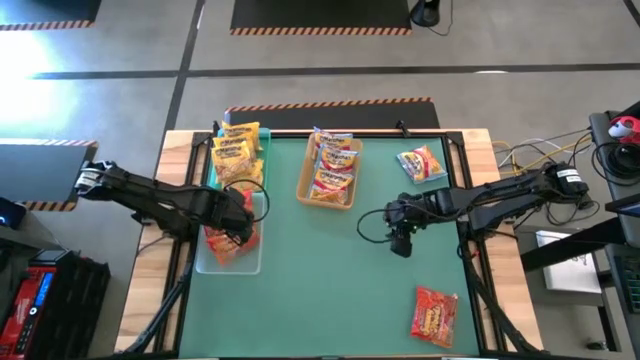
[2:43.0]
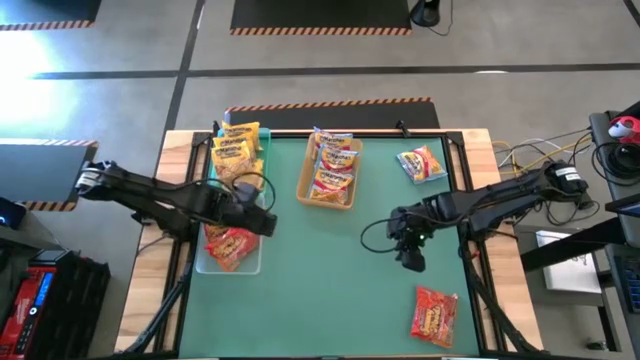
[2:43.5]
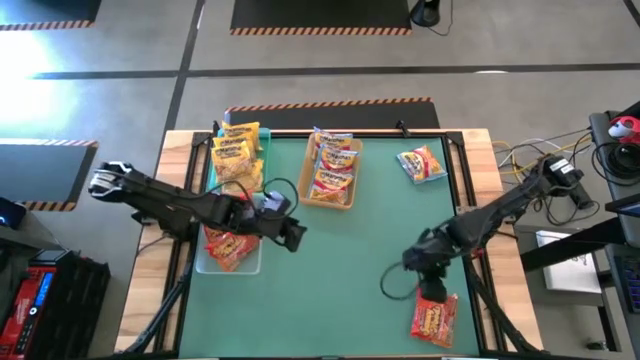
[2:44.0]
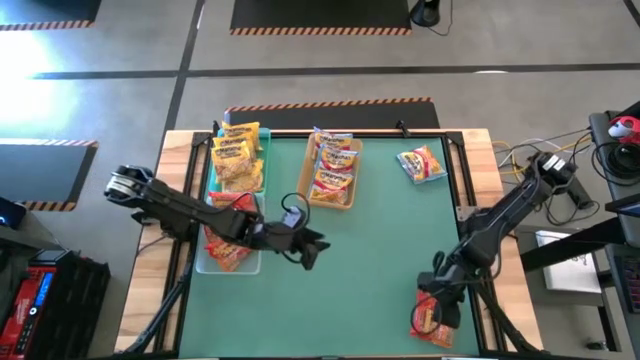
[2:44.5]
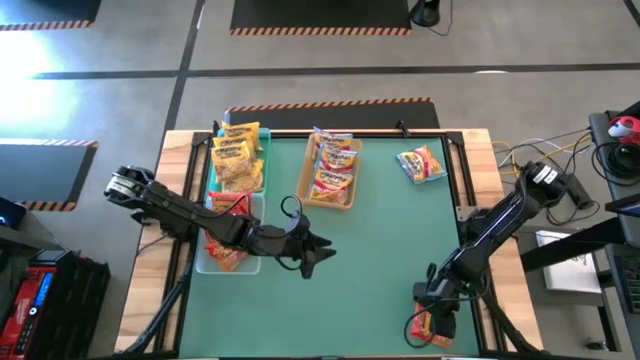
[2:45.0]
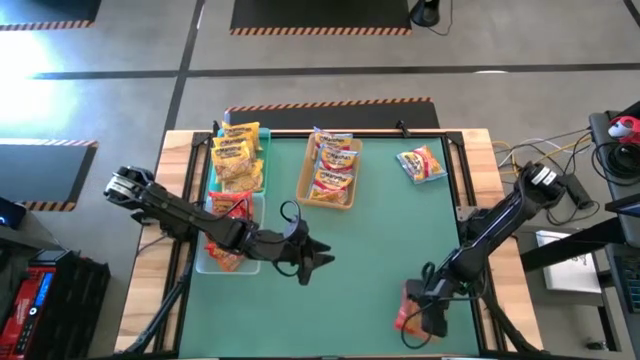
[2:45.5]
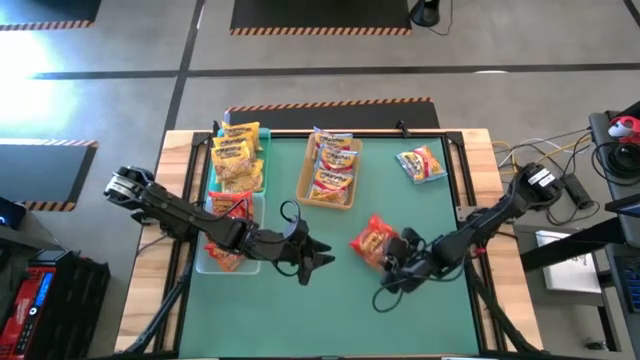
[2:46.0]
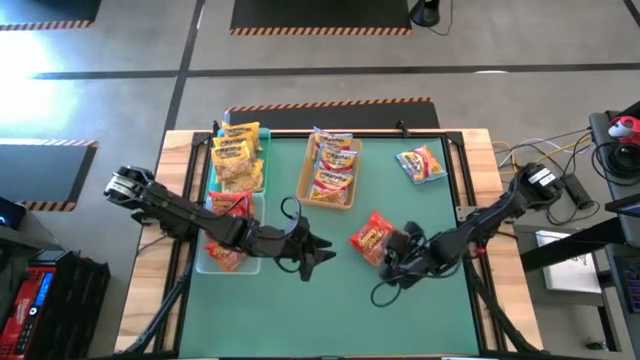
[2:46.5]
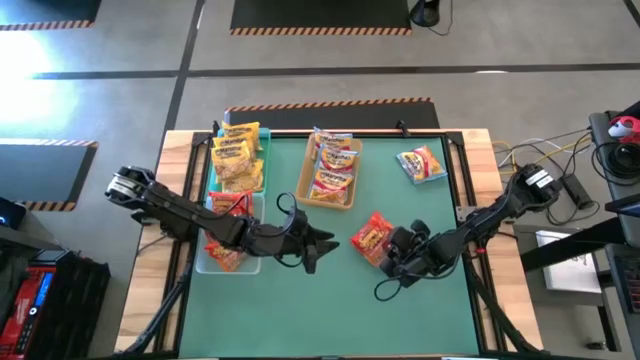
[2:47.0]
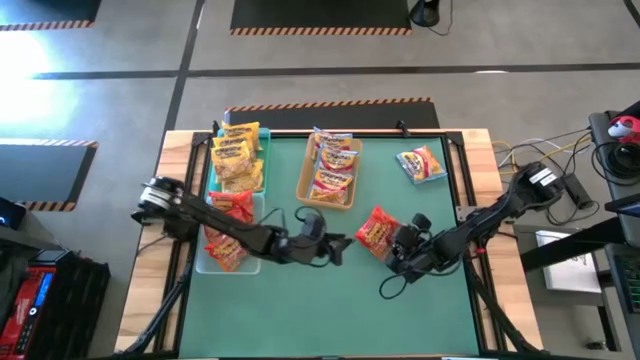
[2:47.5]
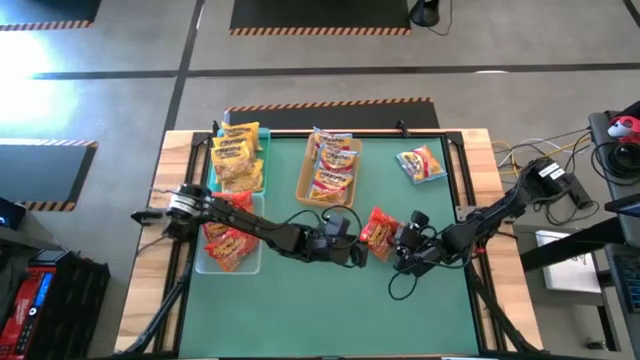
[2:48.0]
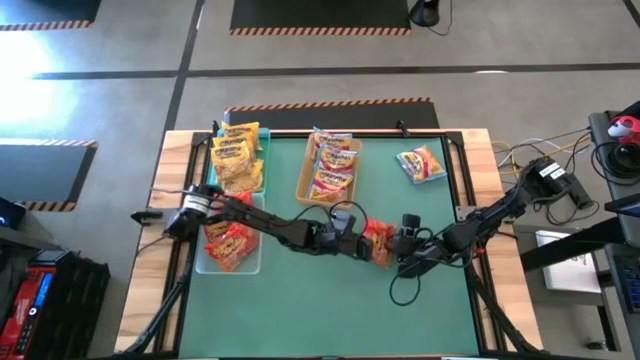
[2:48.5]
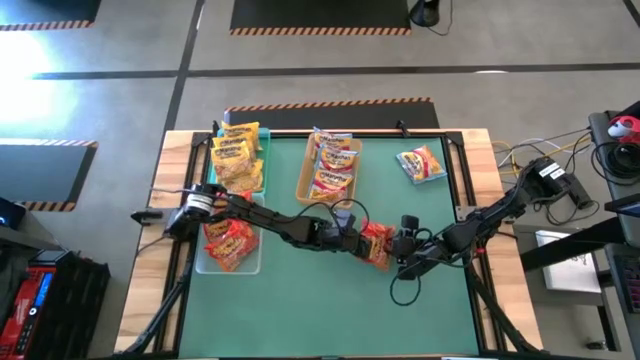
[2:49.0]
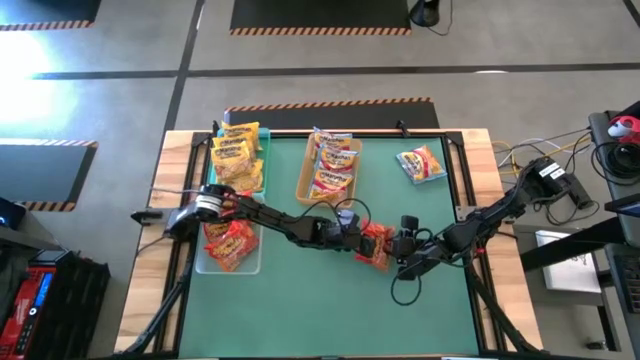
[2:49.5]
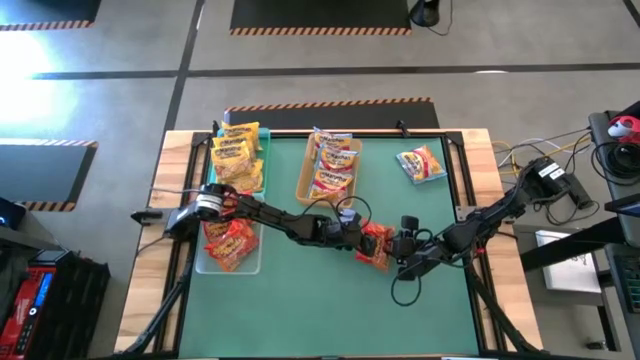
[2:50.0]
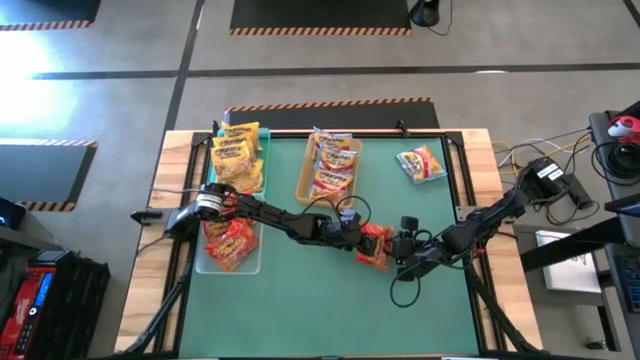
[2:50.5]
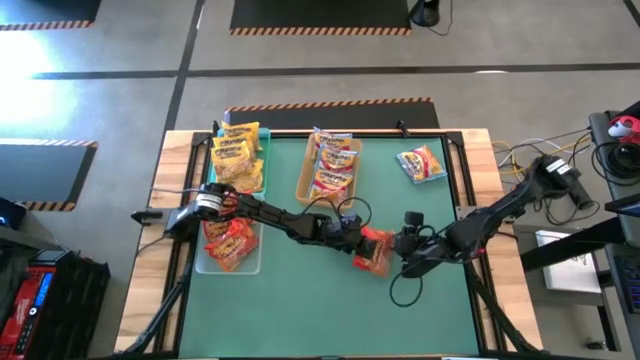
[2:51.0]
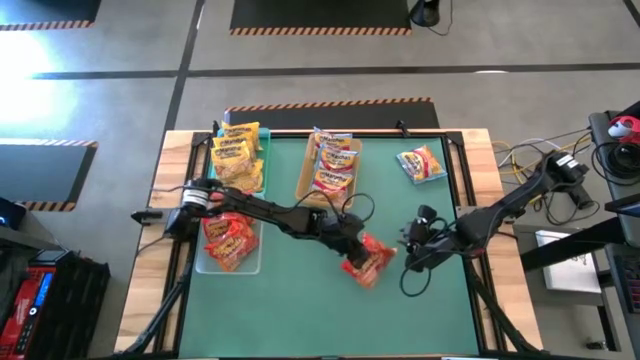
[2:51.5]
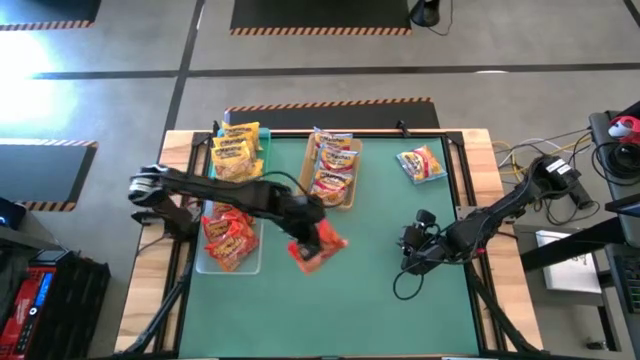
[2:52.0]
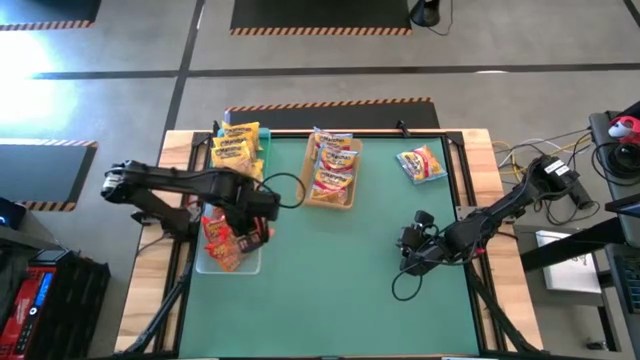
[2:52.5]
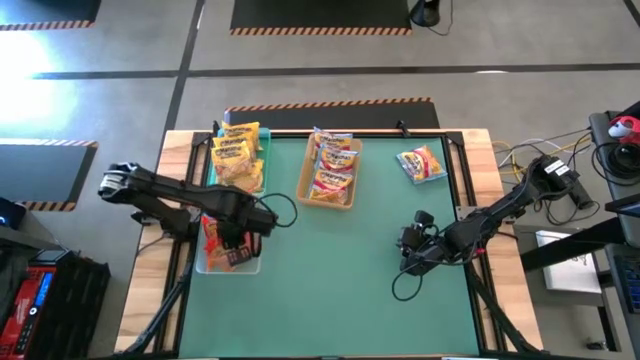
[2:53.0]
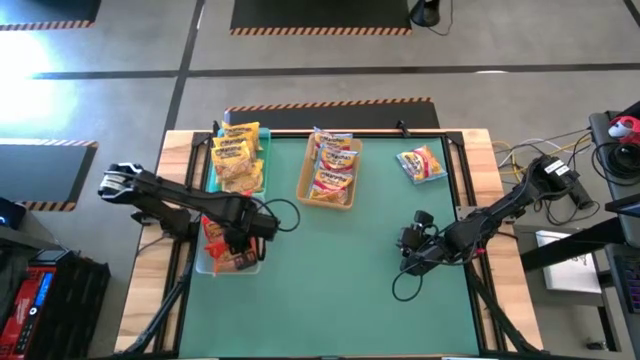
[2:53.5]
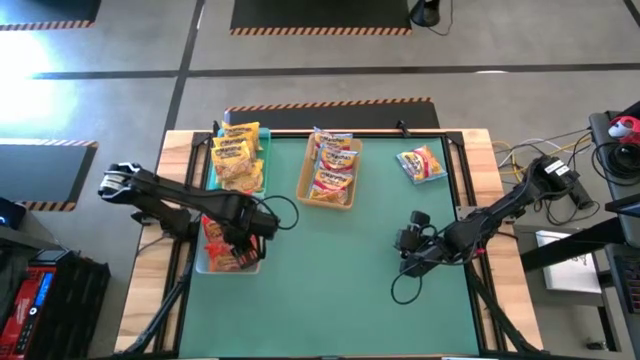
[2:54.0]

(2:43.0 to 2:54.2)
Task: Sort Maruchan noodles
Put the orange noodle pack into the white bin

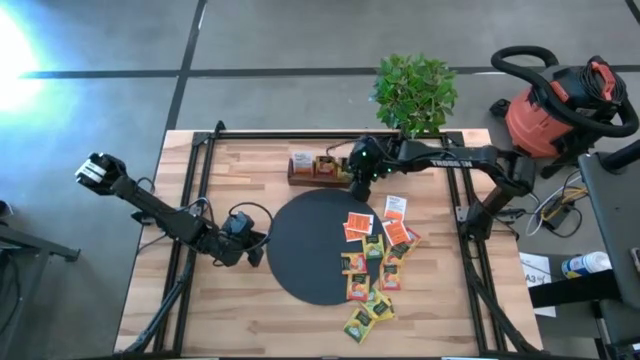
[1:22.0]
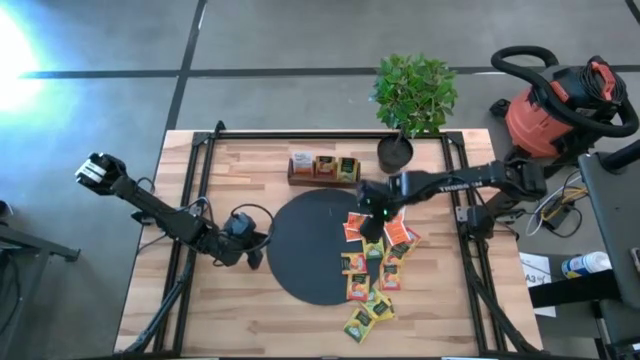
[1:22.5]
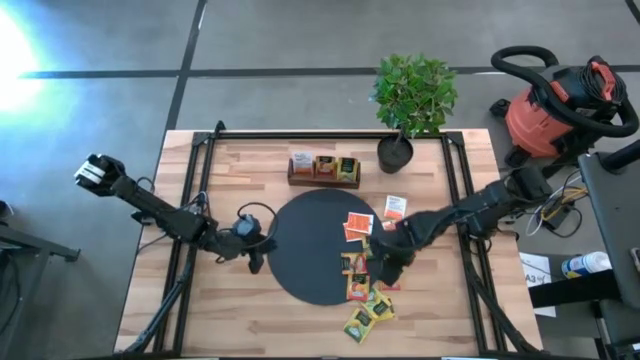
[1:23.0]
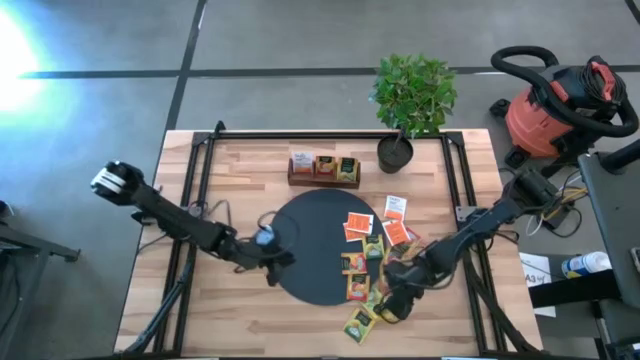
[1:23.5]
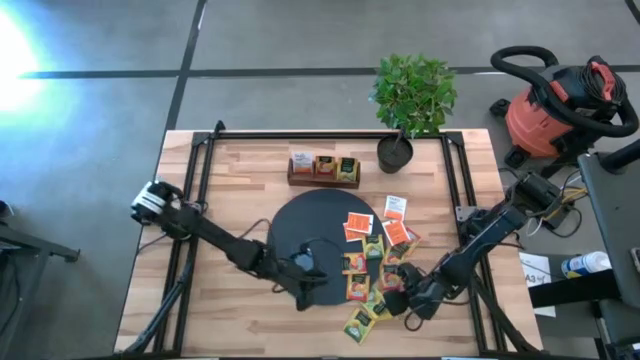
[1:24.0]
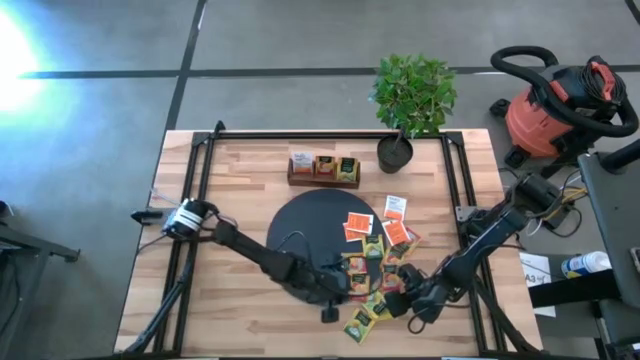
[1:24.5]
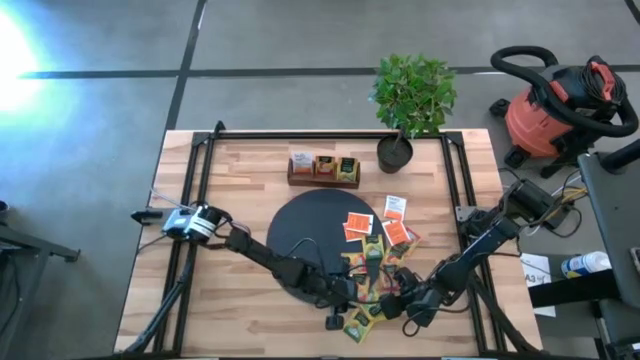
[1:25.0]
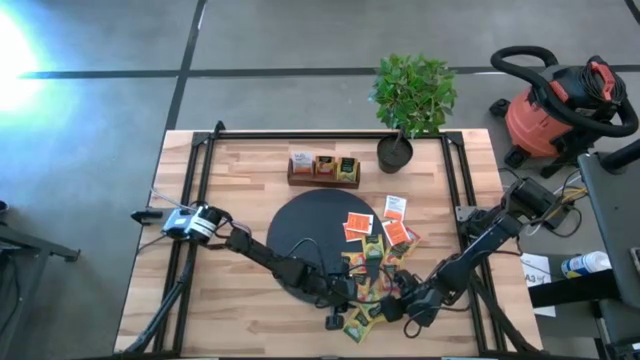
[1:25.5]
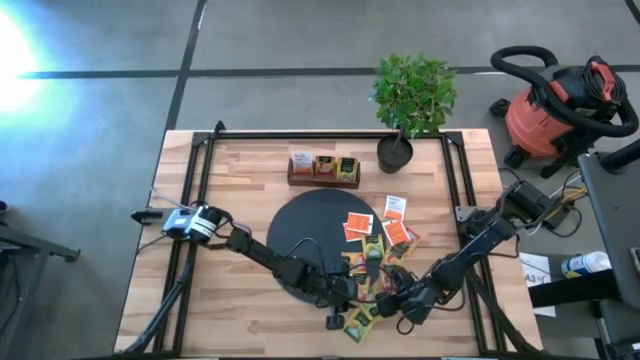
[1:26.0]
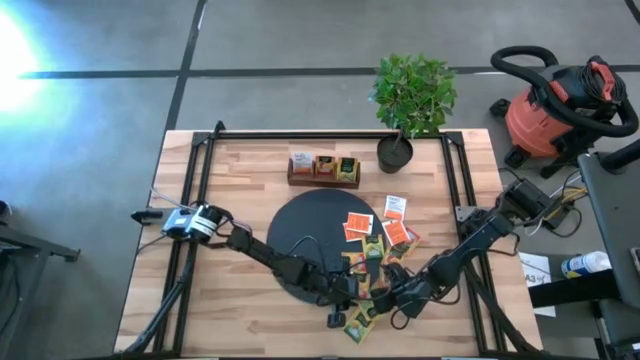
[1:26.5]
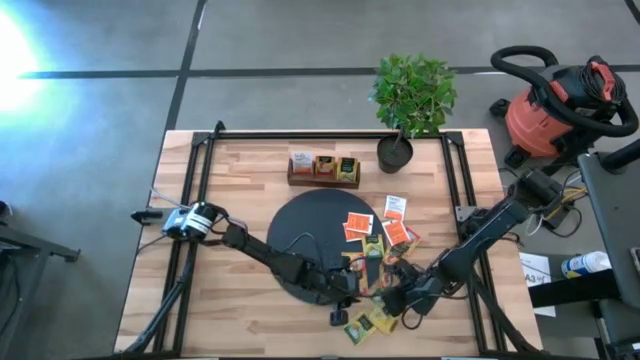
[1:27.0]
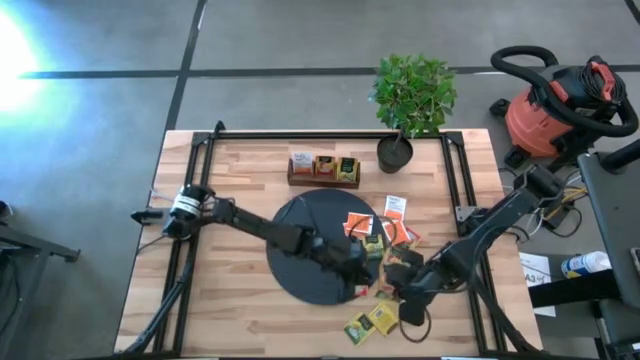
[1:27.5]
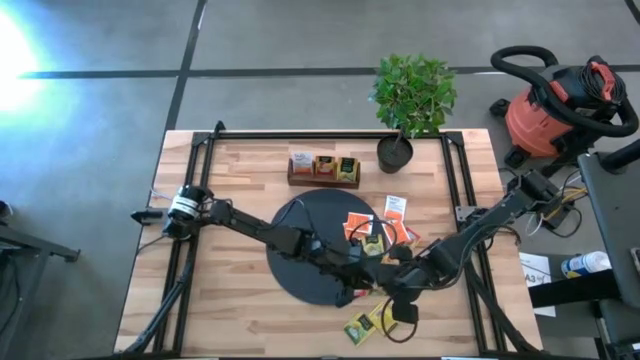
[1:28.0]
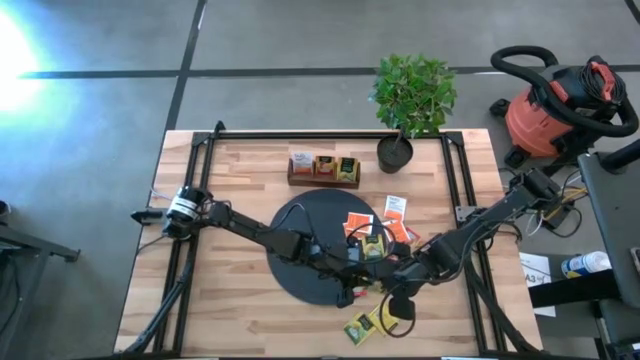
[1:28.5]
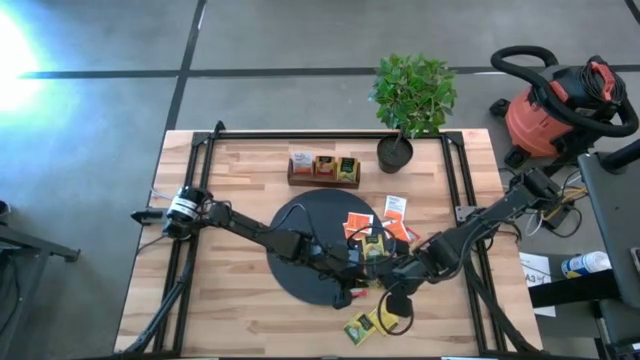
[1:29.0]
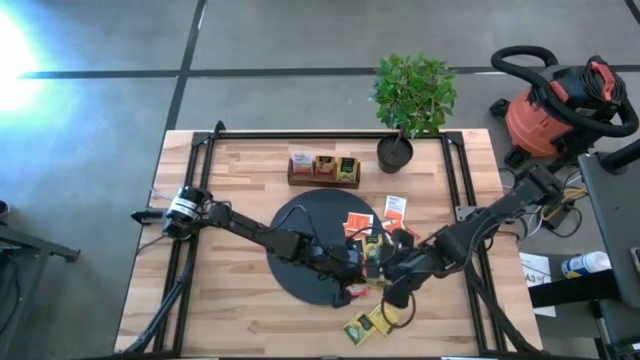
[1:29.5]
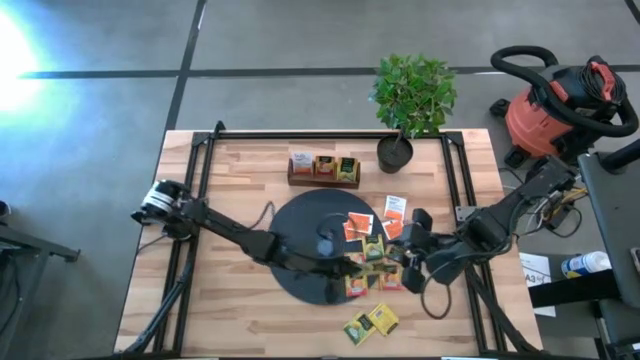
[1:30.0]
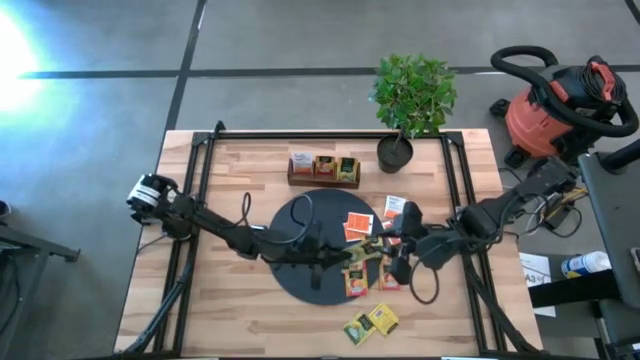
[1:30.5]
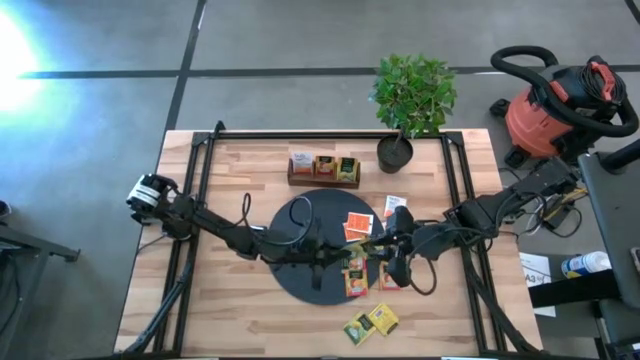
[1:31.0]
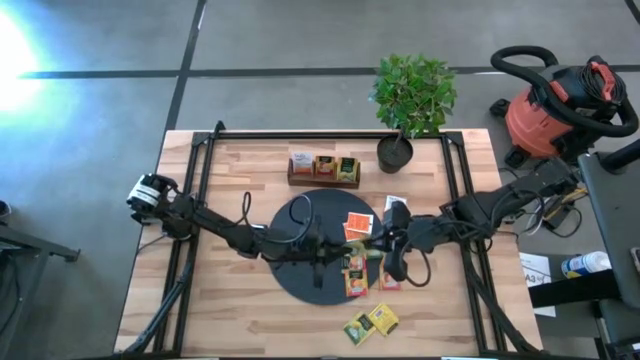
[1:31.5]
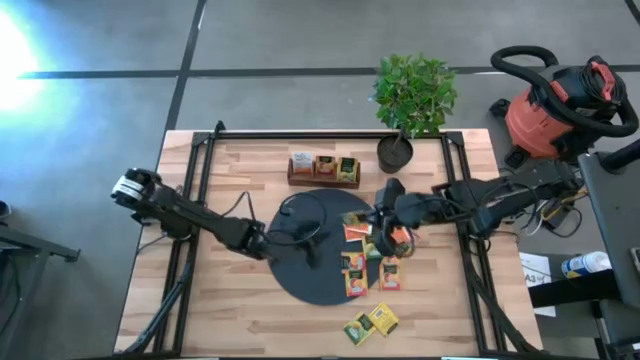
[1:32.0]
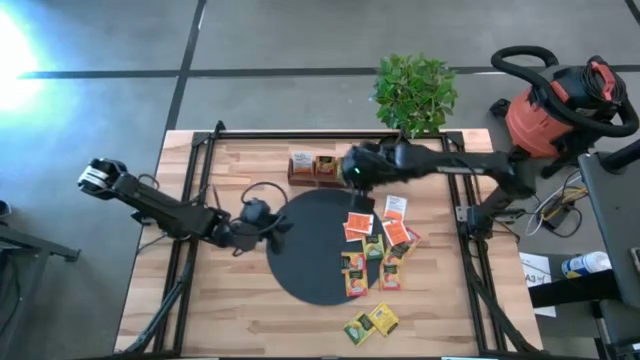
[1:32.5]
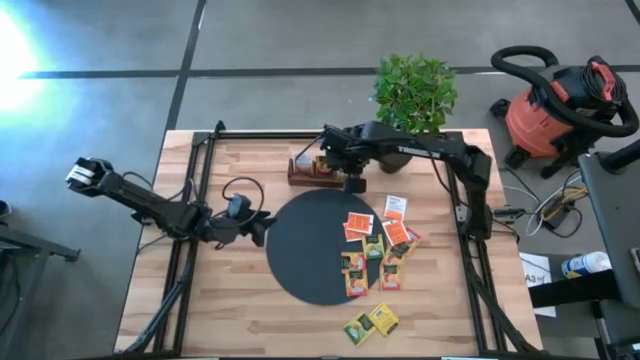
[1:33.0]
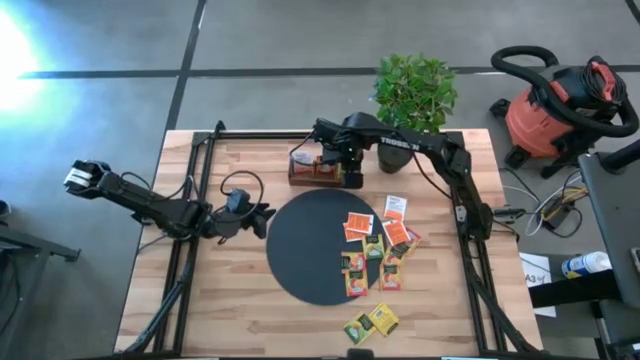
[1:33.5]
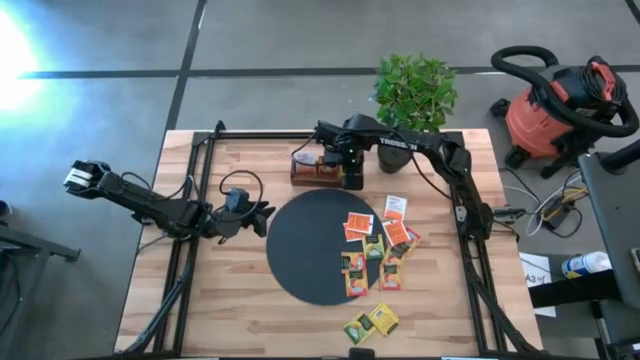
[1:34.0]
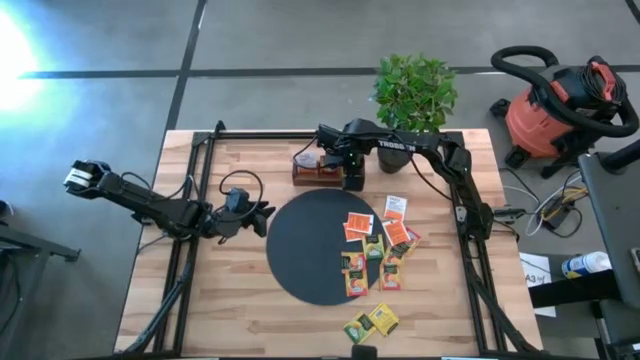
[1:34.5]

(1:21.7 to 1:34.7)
Task: Pick & Place Tea
Put the yellow tea bag into the right section of the brown wooden organizer
